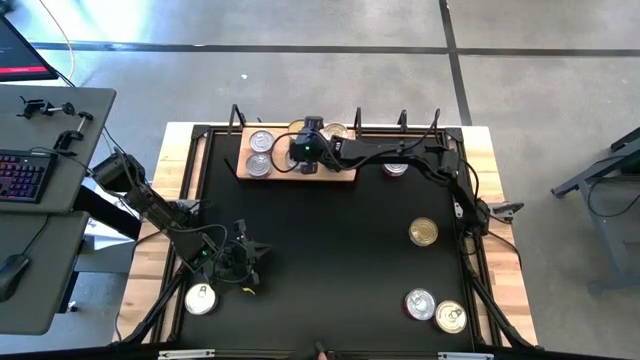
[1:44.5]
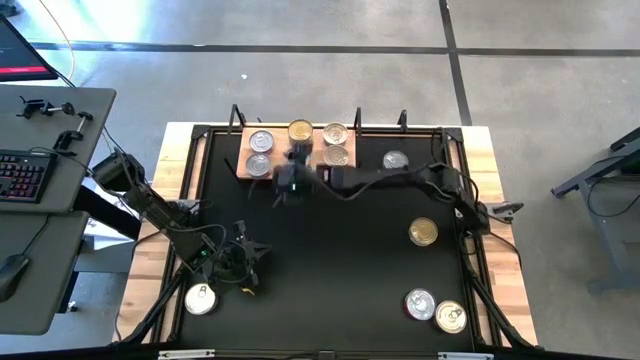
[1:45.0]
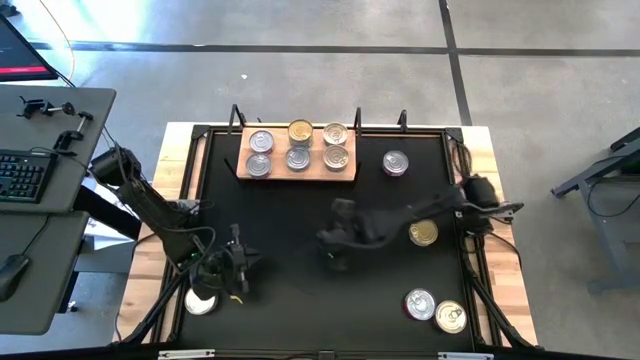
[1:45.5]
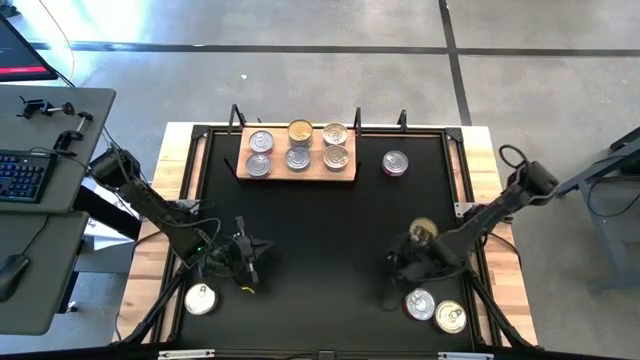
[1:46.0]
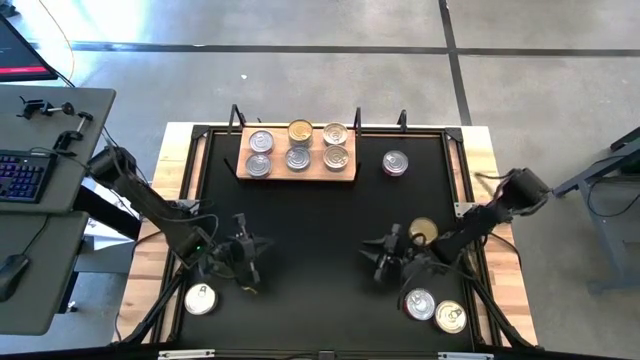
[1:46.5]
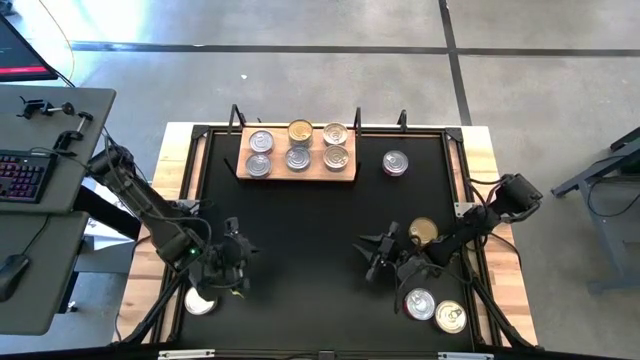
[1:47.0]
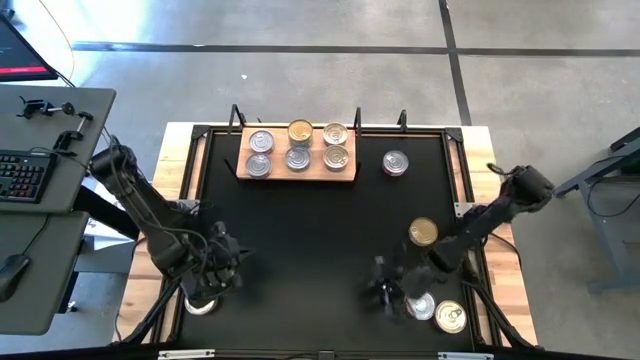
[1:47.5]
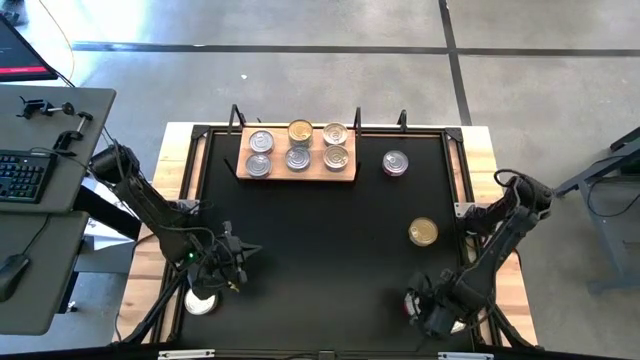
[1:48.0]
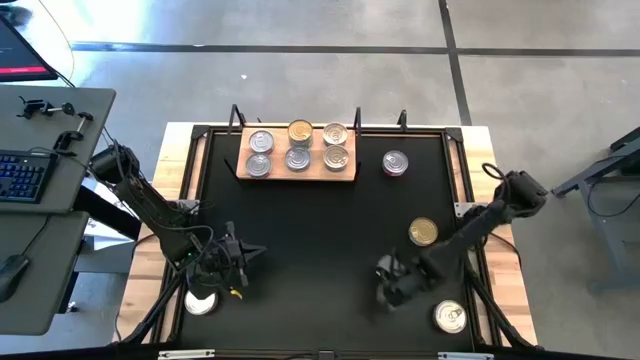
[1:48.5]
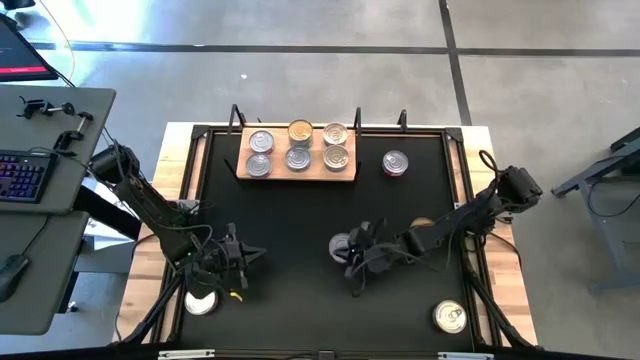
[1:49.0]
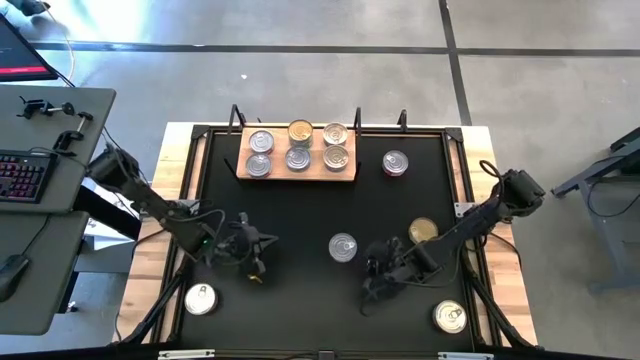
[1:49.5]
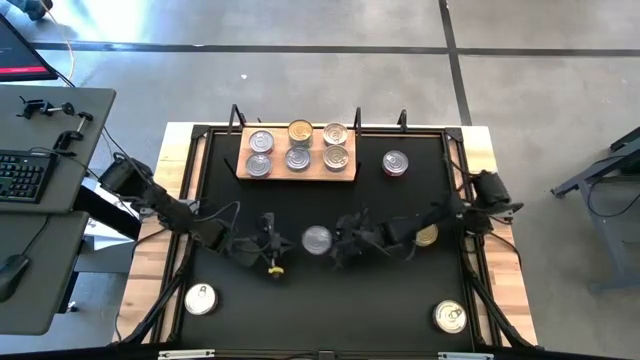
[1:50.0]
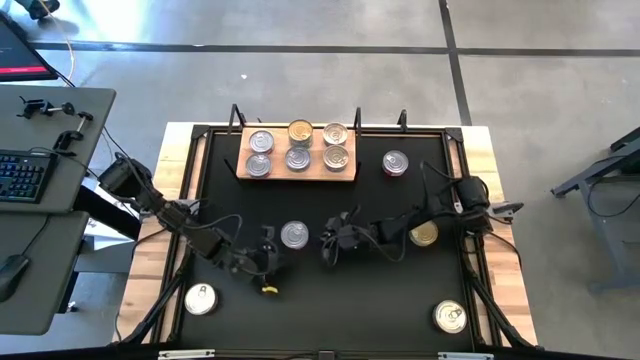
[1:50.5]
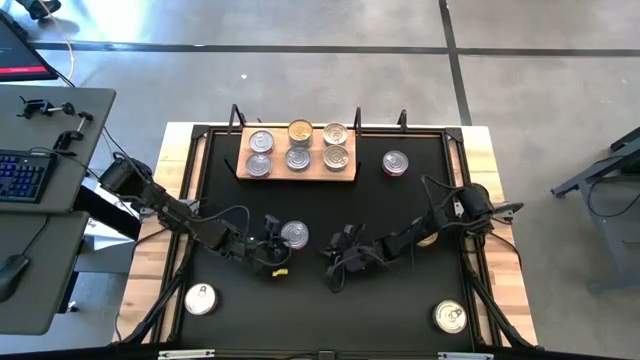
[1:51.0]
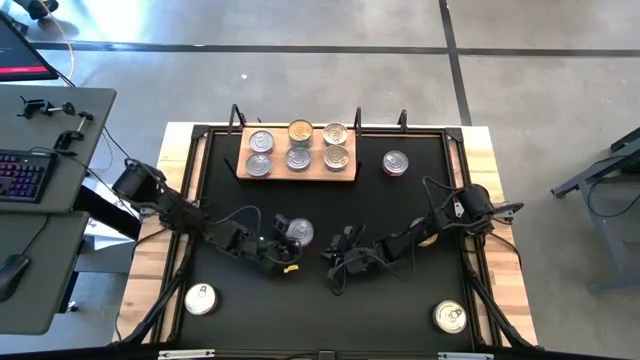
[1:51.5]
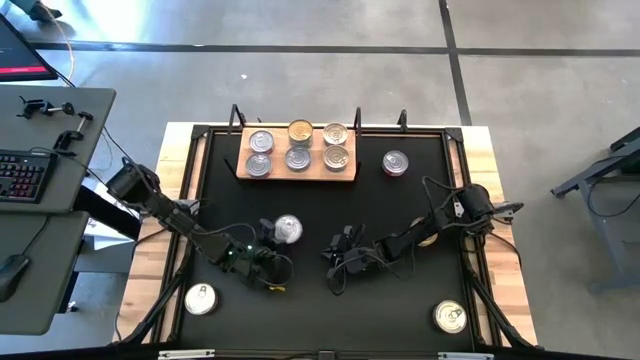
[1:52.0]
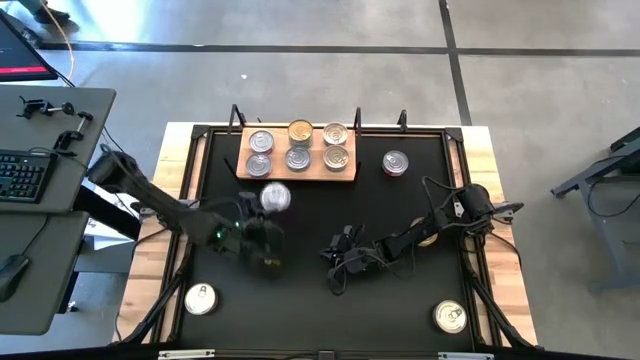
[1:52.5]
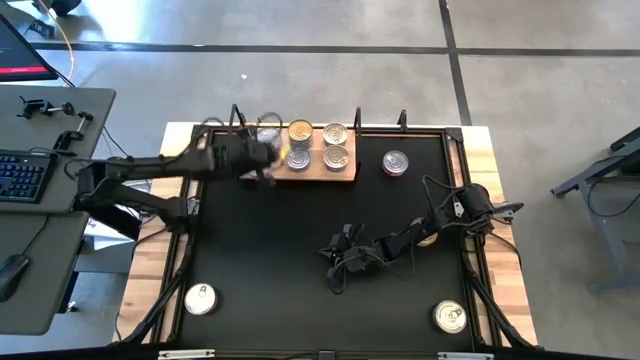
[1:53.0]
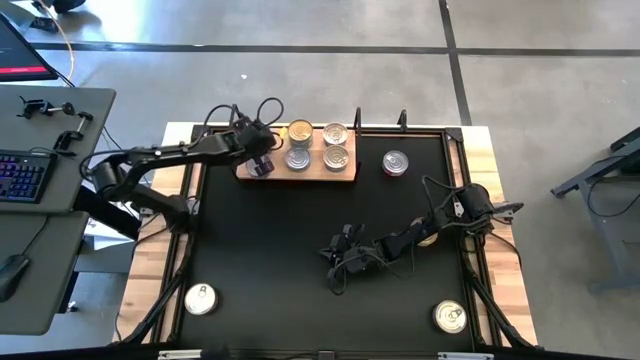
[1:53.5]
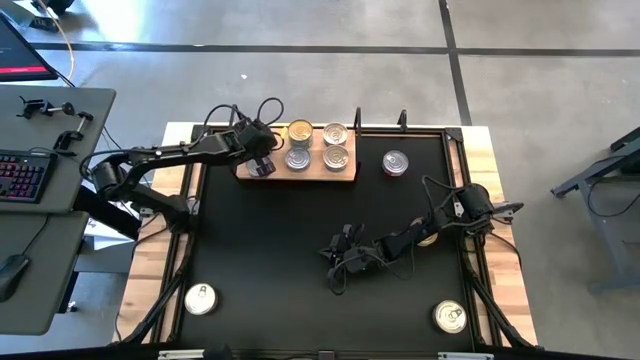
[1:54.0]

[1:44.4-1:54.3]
Task: Stack canned seafood by type on shelf
Stack the red tuna can on top of the red can on the shelf

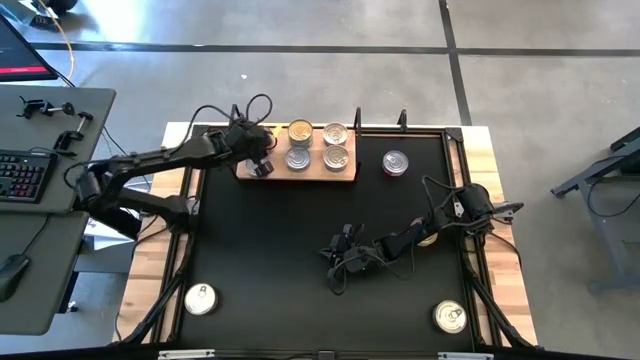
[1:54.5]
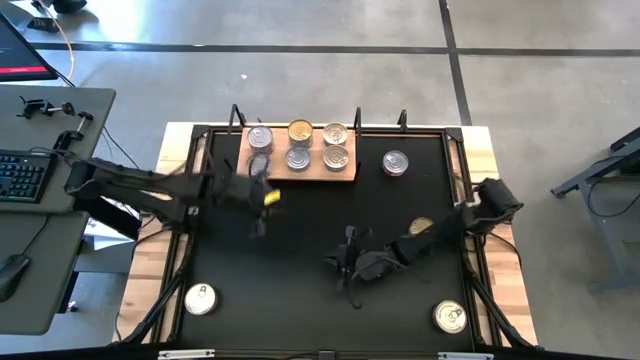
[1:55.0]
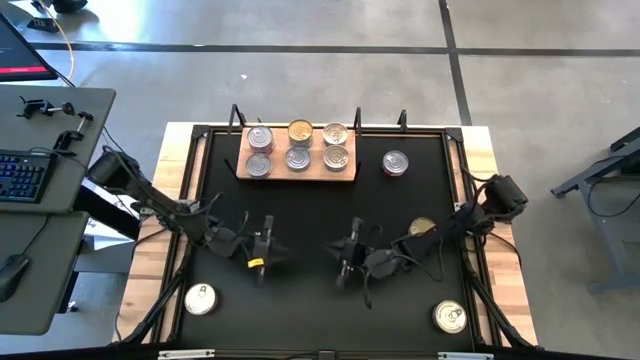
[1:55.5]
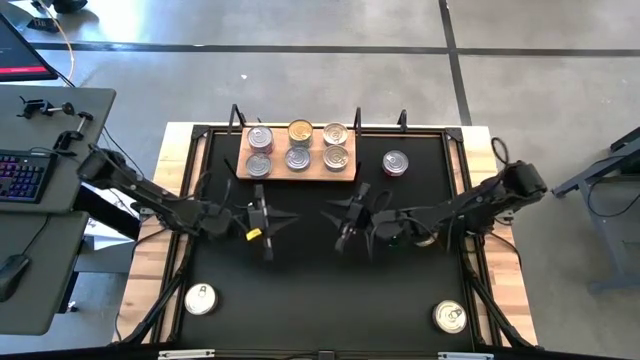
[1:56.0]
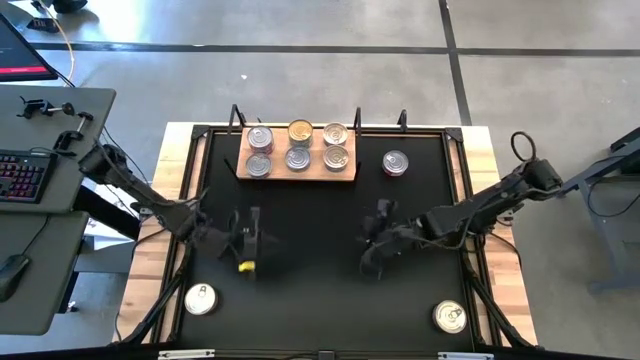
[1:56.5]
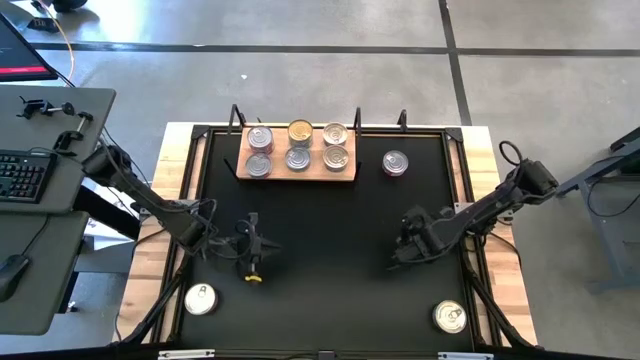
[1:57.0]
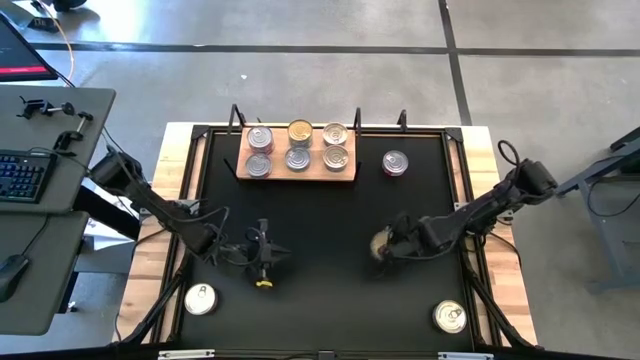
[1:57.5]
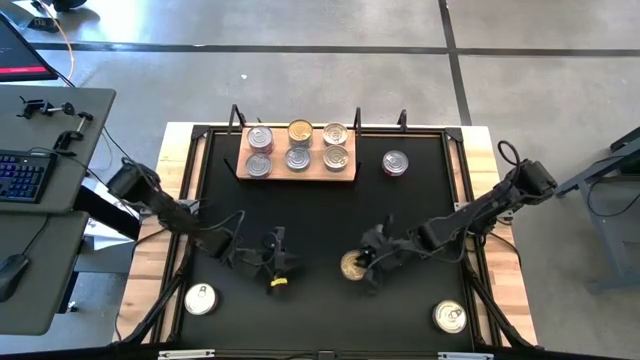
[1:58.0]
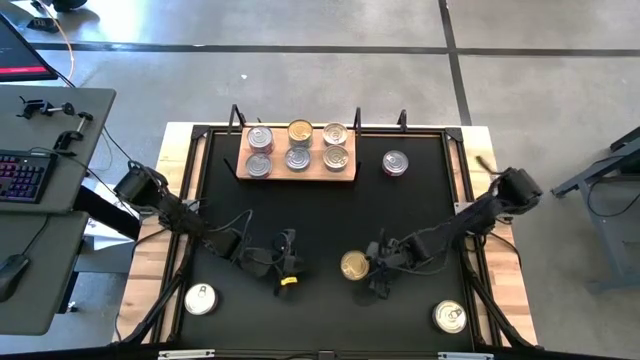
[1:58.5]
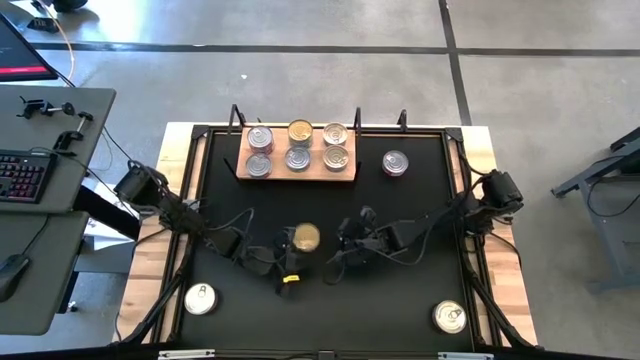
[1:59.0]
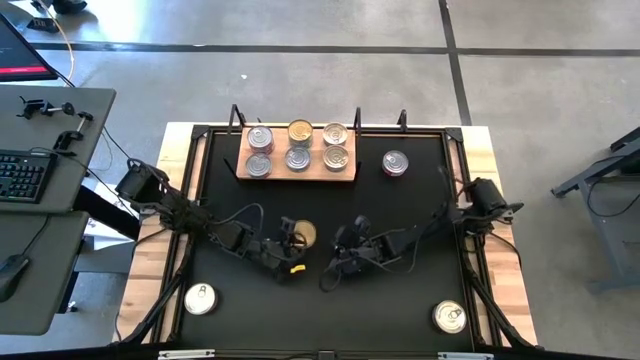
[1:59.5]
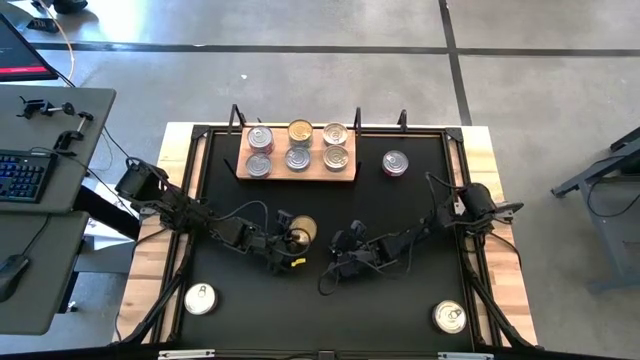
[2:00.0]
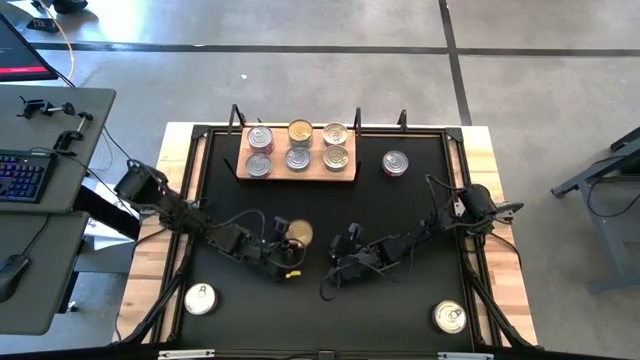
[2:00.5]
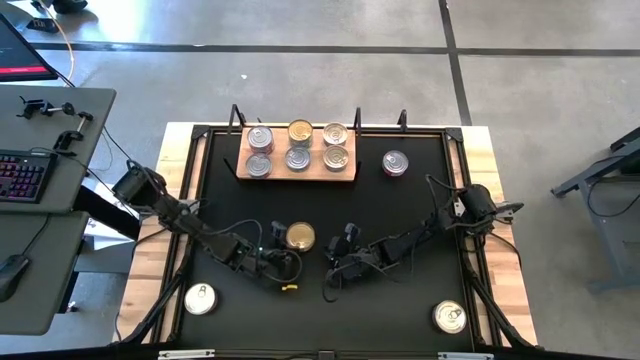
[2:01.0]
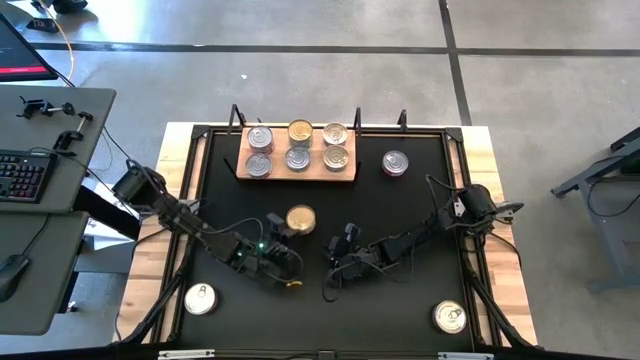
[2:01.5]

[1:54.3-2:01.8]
Stack the green tuna can on top of the green tuna can on the shelf

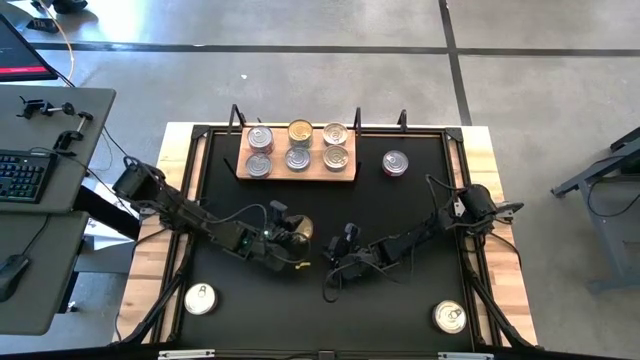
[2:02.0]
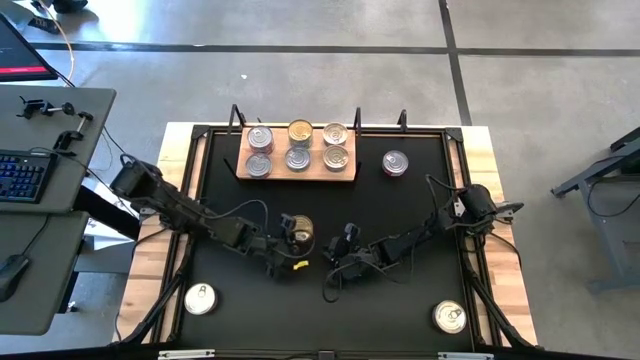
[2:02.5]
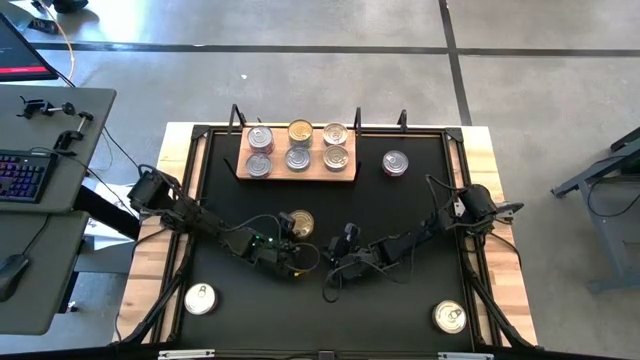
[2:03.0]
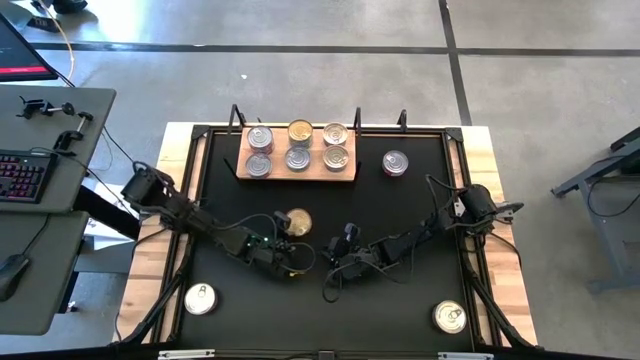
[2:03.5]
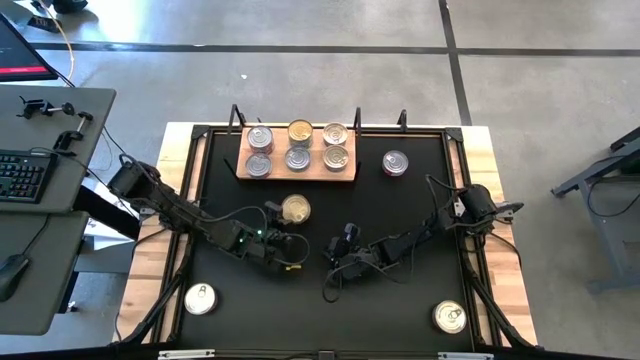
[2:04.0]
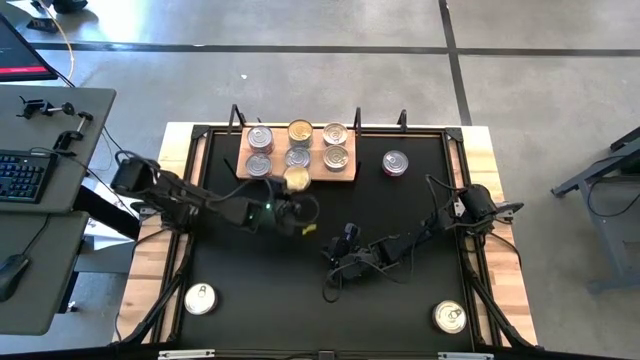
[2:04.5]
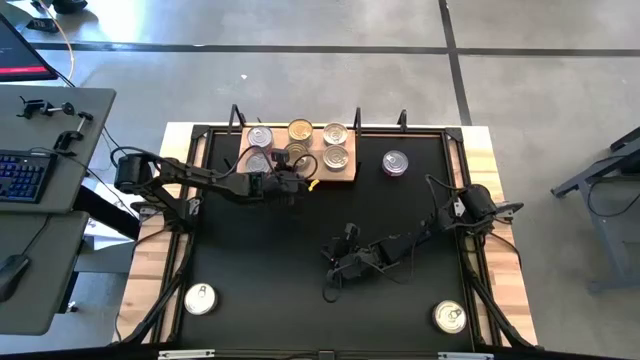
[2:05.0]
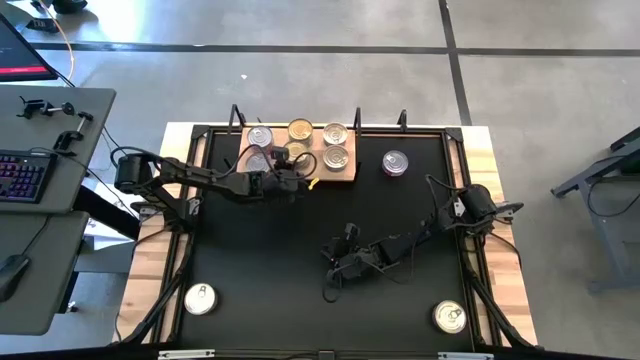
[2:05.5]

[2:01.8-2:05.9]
Stack the green tuna can on top of the green tuna can on the shelf
